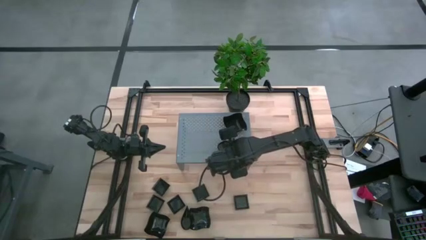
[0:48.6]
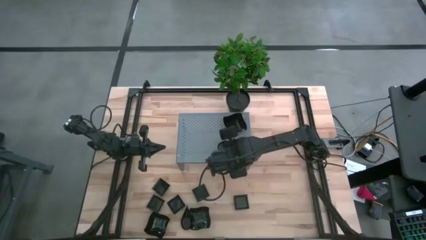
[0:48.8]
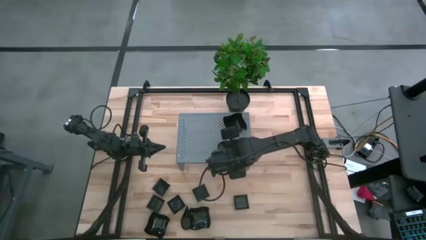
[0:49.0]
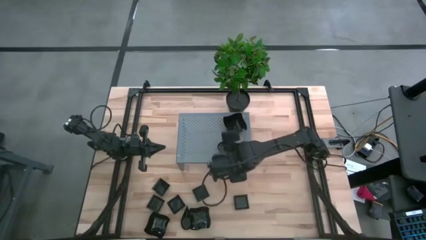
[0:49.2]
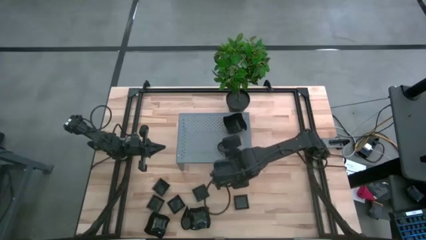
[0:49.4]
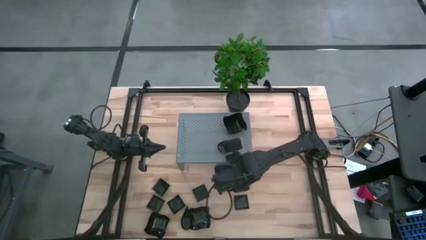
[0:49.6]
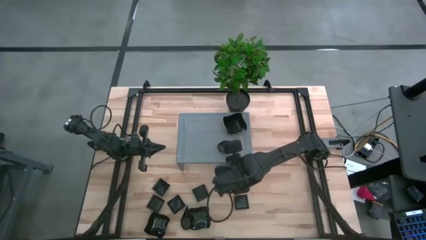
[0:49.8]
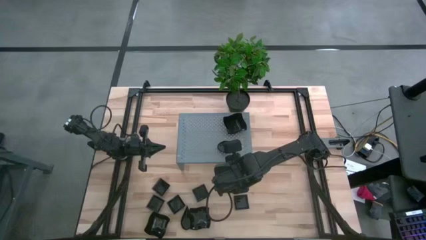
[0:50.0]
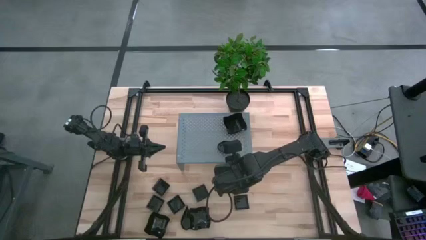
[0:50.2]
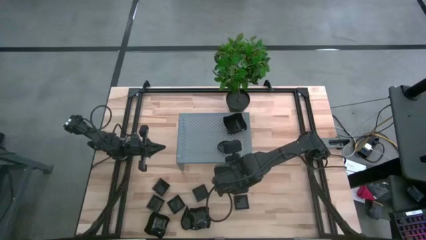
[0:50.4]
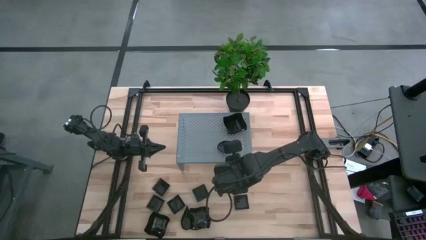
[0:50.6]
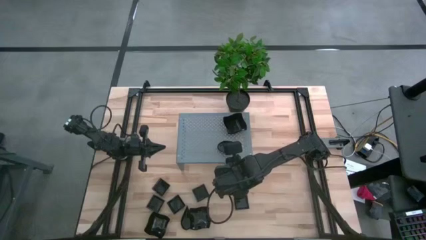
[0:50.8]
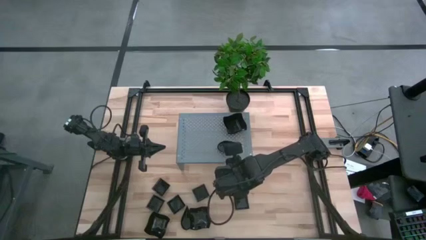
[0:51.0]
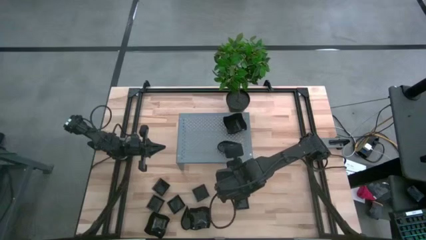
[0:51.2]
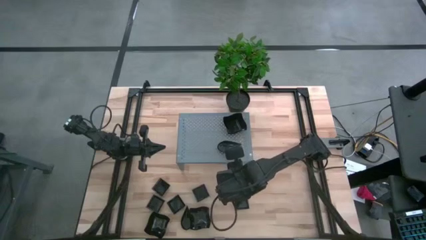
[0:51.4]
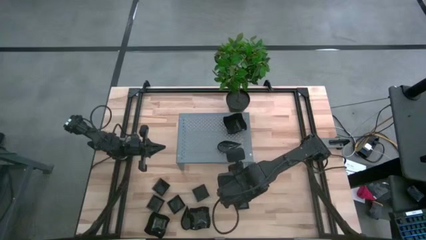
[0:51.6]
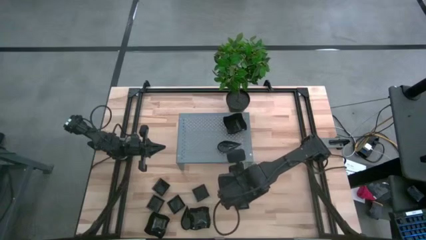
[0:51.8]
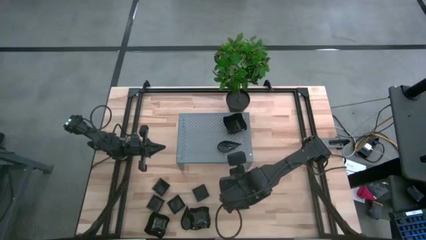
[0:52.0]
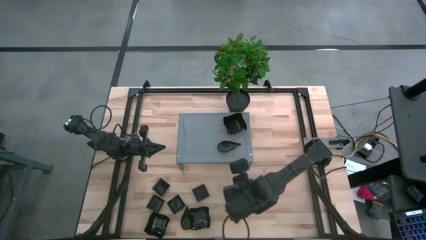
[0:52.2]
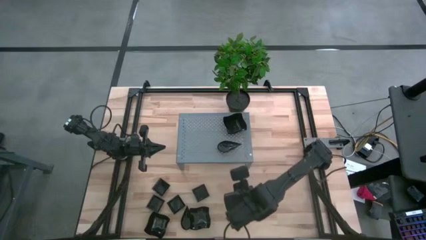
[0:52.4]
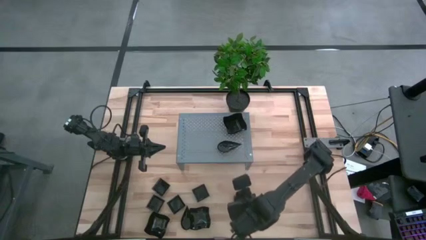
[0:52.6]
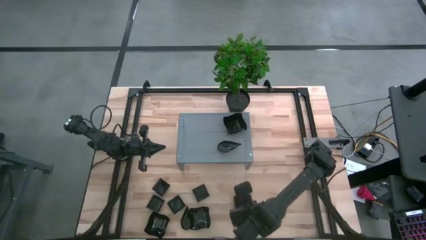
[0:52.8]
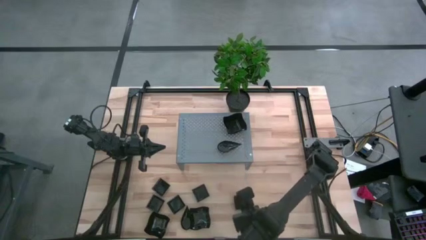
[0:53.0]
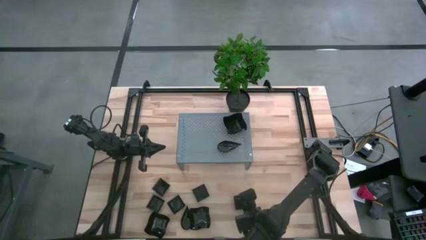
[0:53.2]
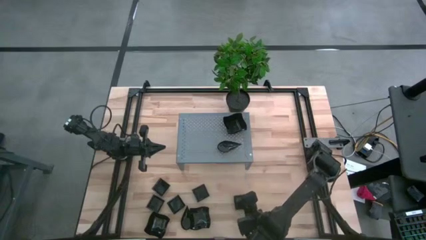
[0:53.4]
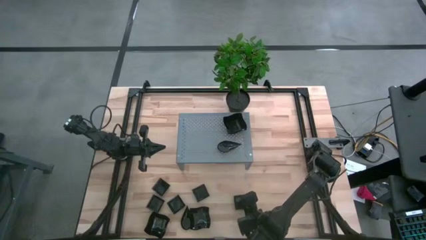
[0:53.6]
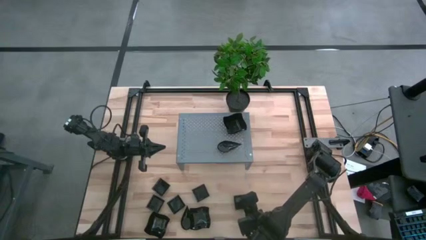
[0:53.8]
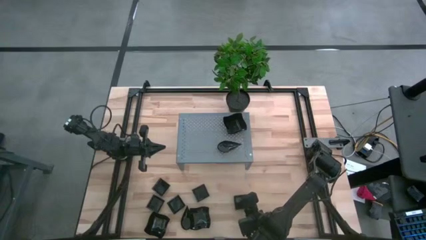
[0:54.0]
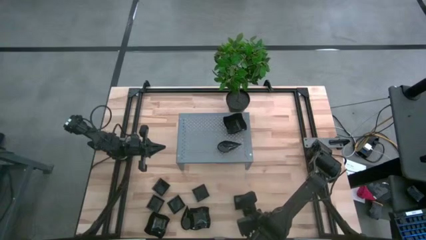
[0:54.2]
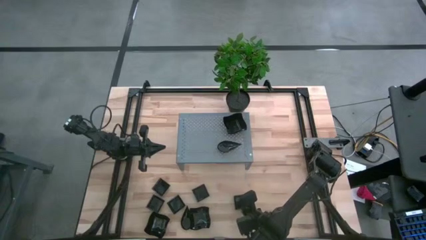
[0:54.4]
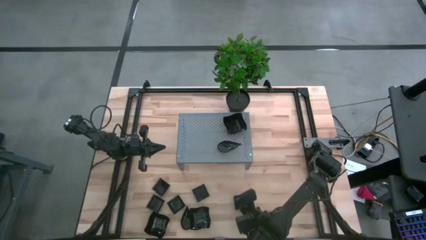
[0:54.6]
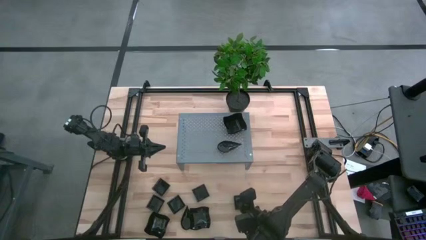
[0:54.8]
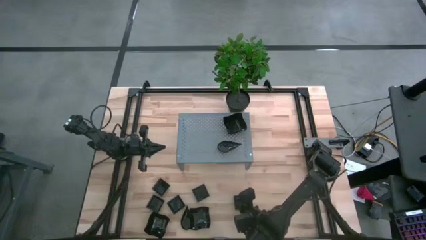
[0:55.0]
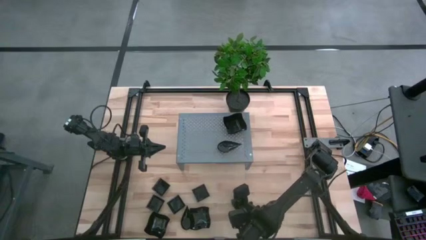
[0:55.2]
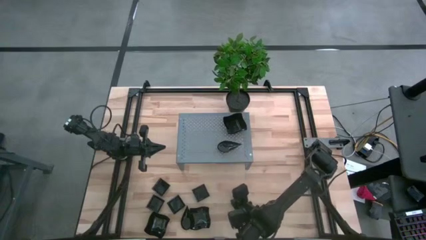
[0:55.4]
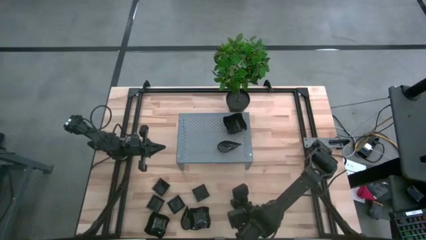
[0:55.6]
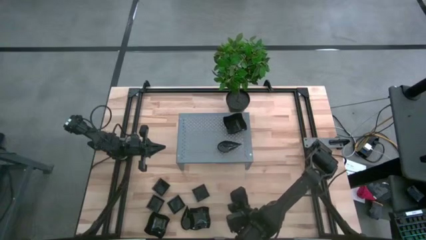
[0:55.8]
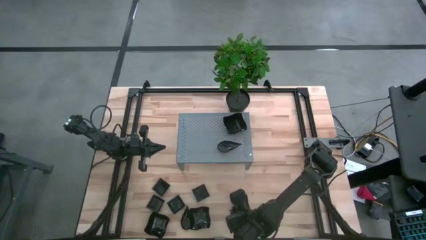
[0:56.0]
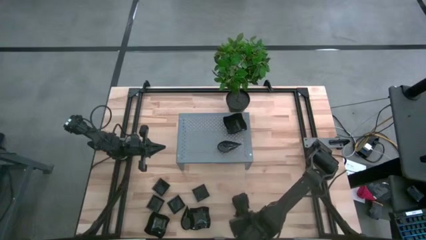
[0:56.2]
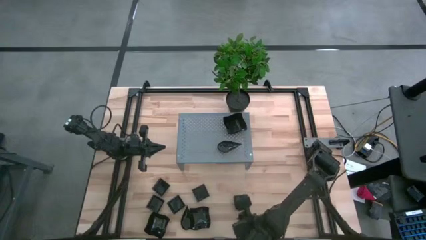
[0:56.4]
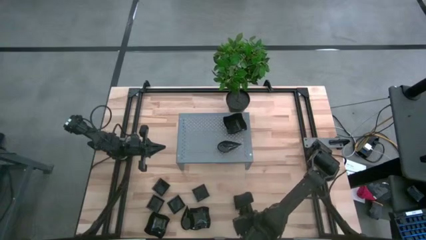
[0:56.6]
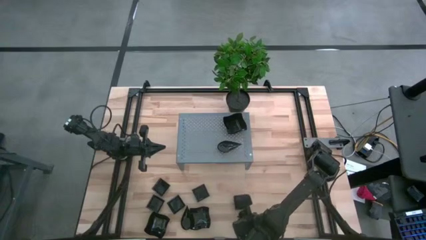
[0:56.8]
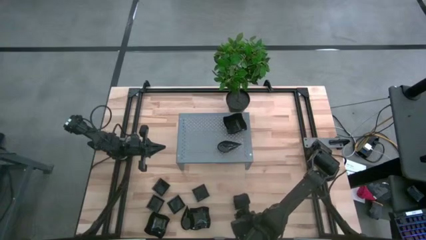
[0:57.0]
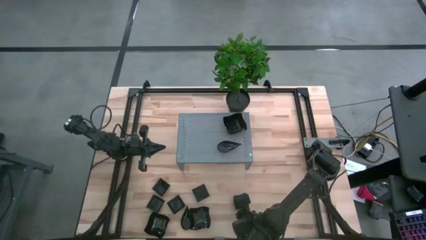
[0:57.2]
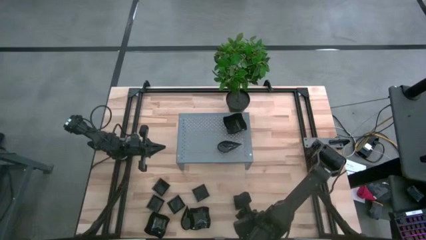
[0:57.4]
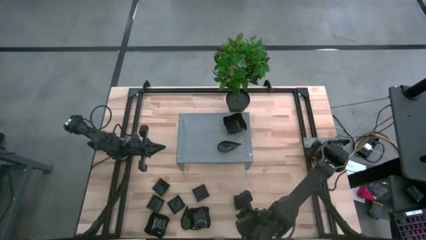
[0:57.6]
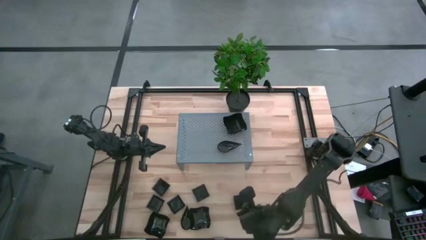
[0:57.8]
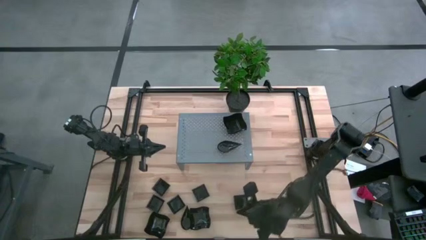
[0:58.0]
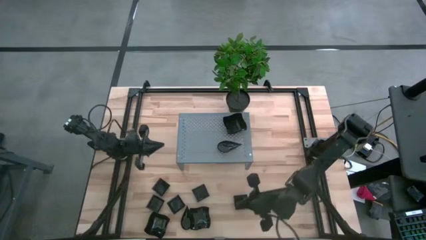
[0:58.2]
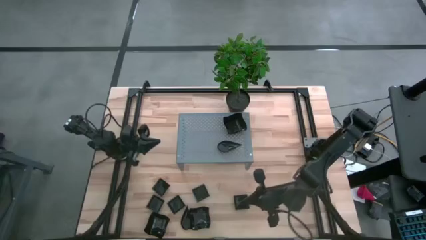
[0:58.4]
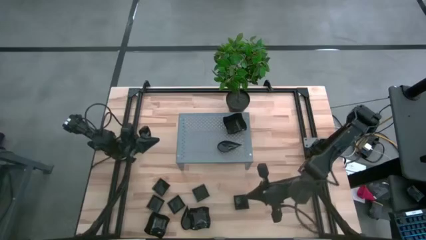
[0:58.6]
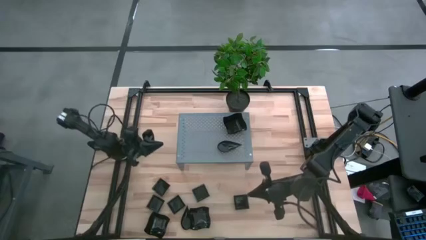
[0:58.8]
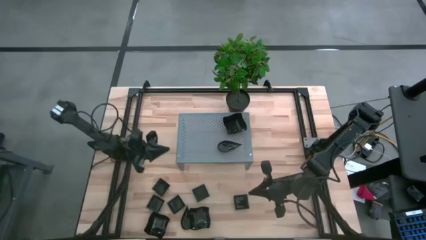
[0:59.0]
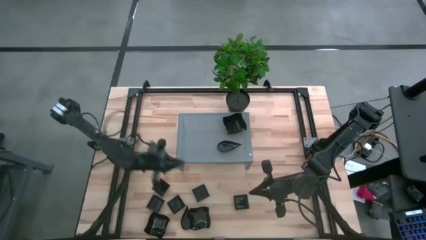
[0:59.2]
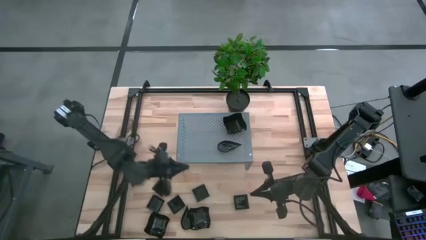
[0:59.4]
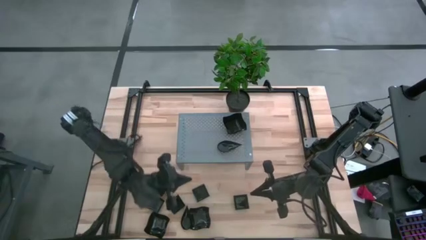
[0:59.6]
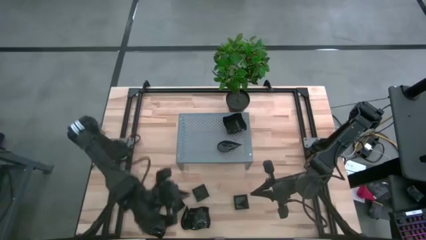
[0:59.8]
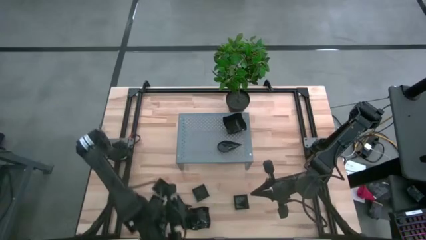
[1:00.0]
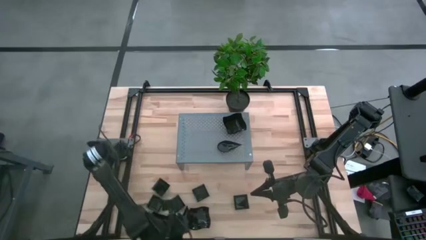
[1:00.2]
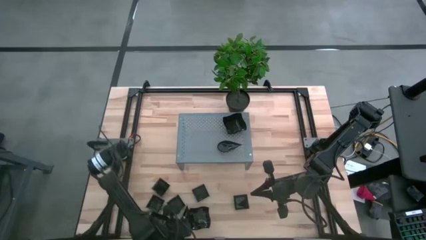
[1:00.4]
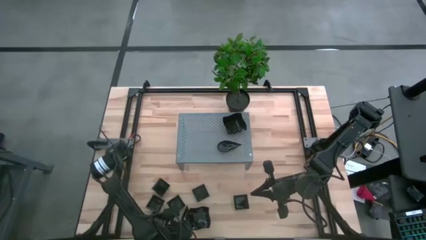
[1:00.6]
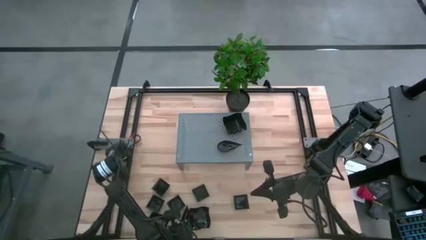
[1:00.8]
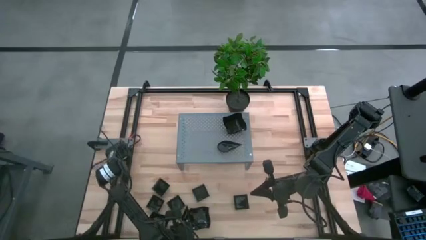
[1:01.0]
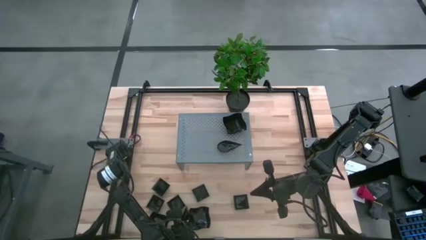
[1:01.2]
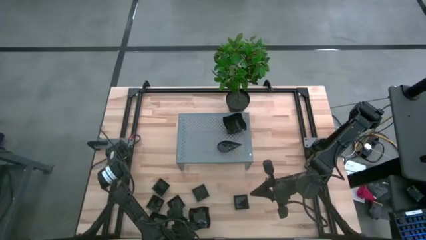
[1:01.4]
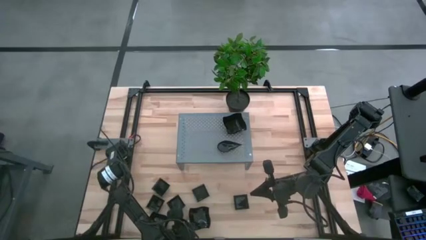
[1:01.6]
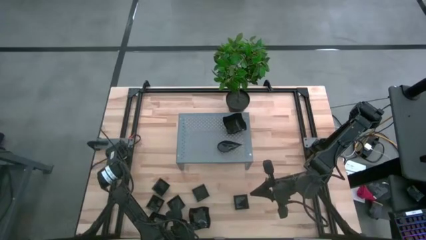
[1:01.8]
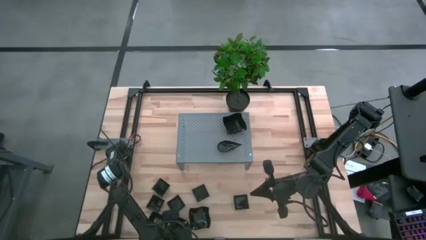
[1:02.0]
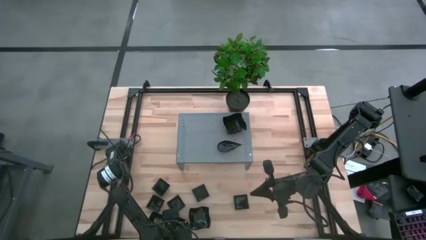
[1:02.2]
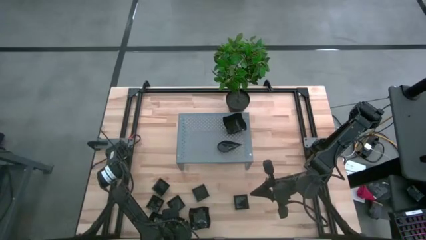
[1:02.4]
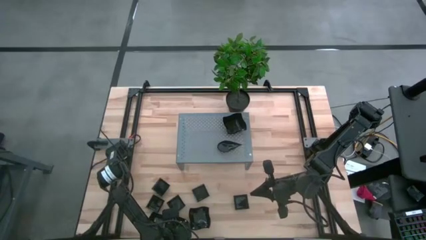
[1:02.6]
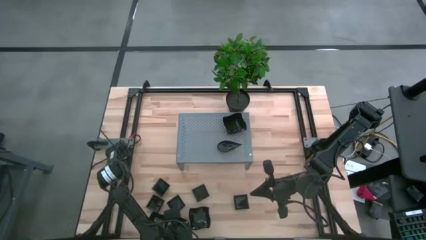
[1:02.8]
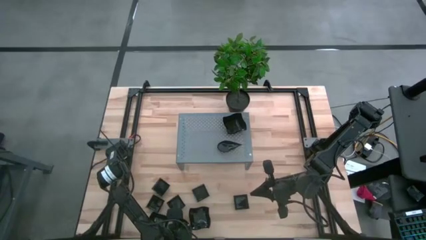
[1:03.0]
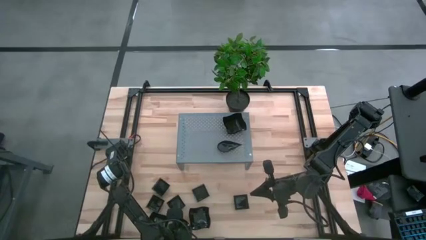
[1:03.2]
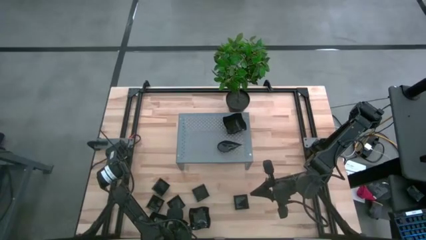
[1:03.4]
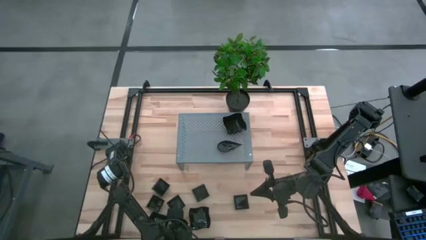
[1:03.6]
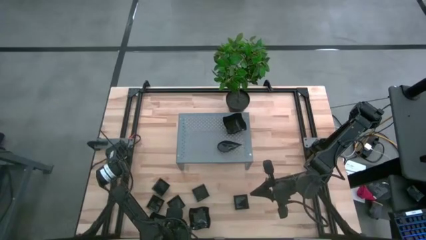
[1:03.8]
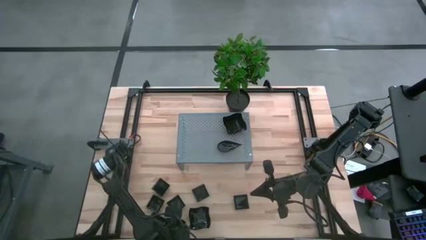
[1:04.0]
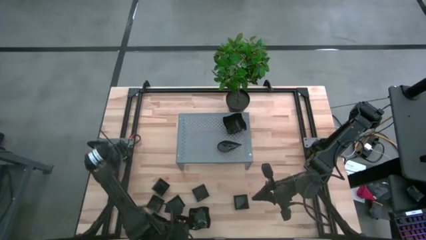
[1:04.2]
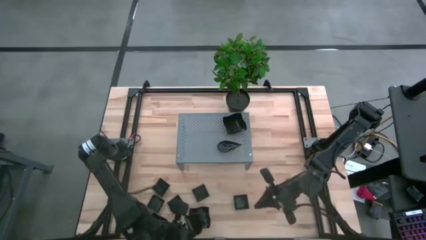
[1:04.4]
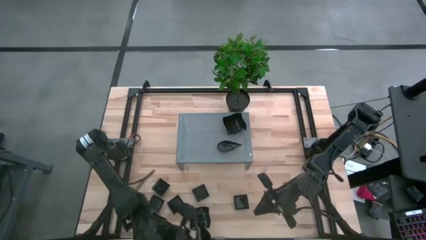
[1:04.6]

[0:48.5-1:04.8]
Task: Pick & Place Mini shaped plates
Stack the black drop-shaped plate on the black drop-shaped plates on the shelf
